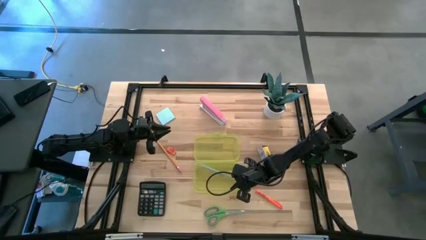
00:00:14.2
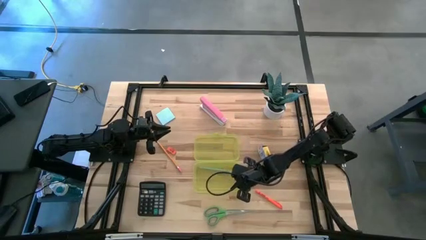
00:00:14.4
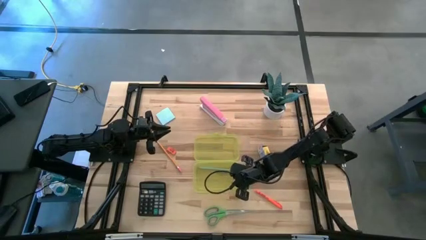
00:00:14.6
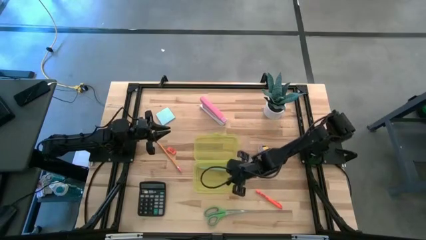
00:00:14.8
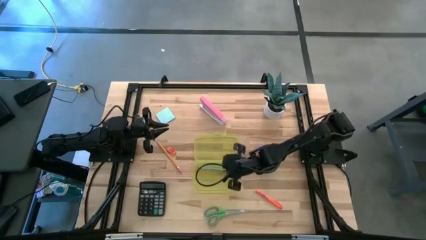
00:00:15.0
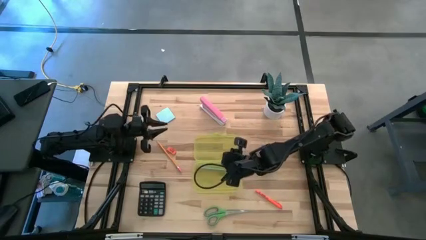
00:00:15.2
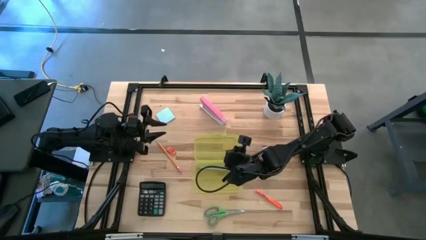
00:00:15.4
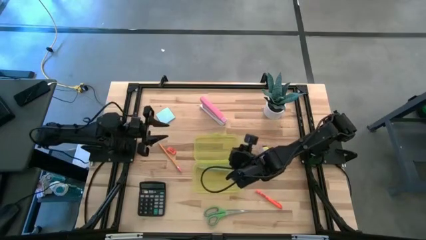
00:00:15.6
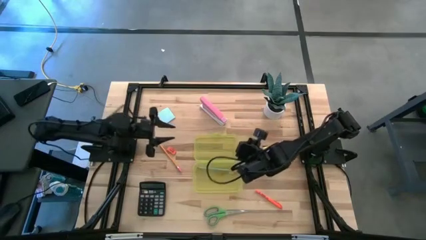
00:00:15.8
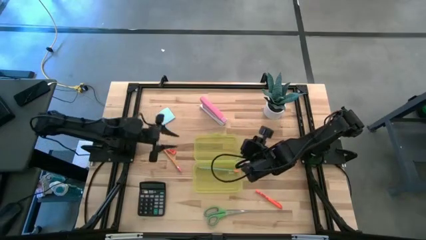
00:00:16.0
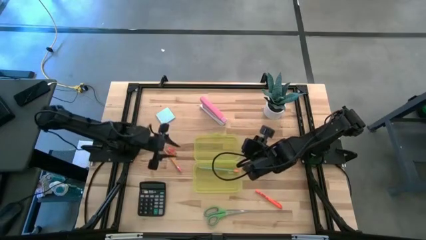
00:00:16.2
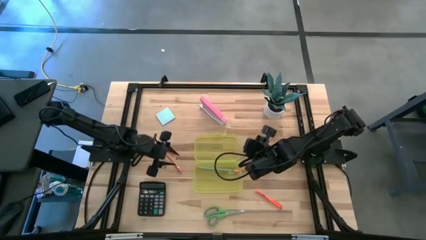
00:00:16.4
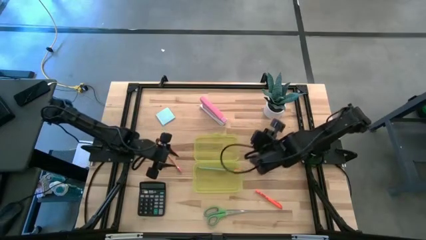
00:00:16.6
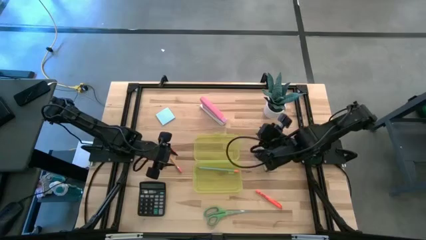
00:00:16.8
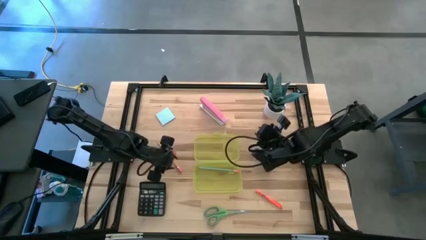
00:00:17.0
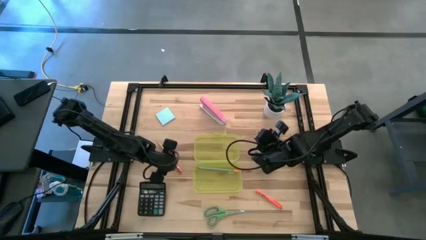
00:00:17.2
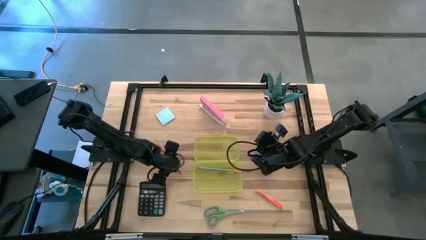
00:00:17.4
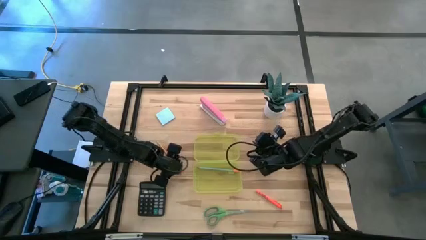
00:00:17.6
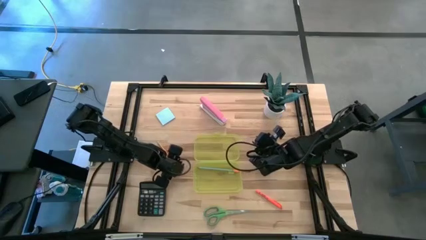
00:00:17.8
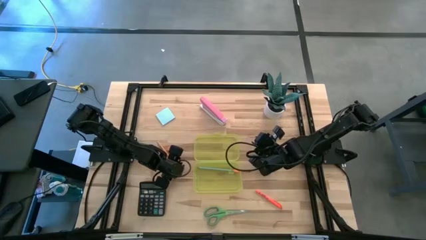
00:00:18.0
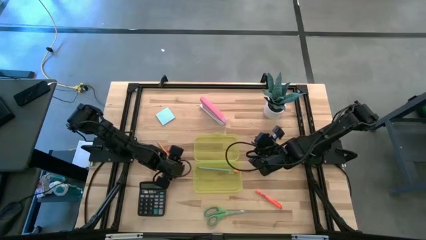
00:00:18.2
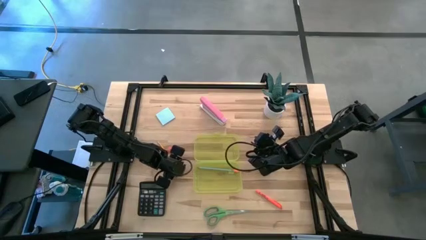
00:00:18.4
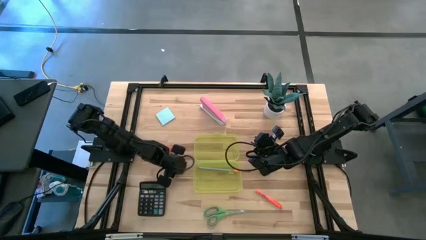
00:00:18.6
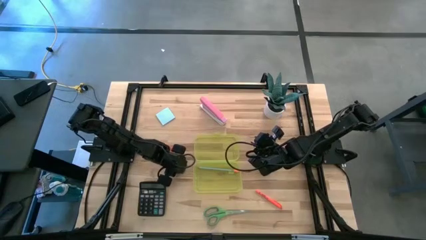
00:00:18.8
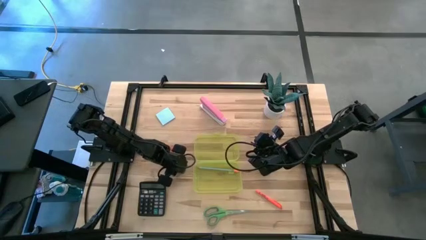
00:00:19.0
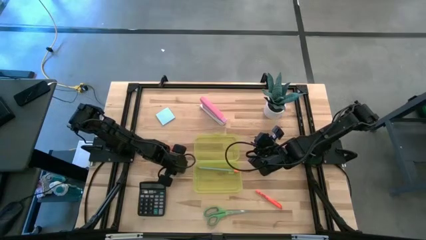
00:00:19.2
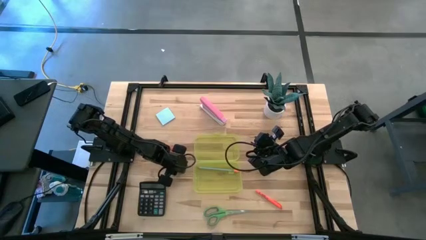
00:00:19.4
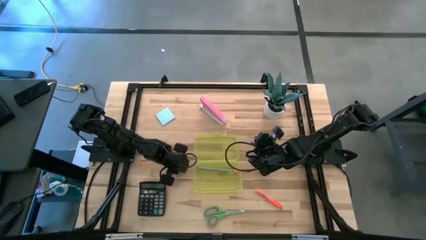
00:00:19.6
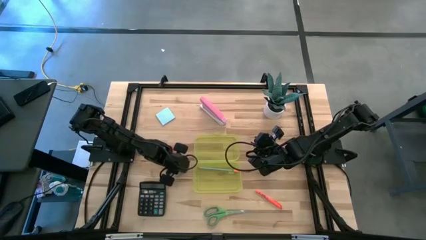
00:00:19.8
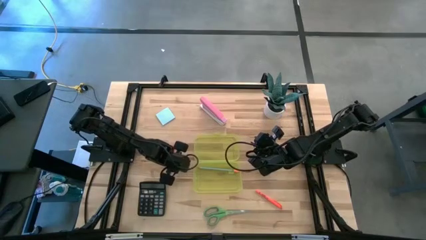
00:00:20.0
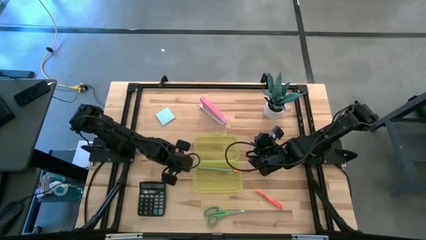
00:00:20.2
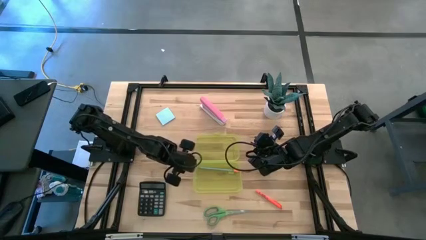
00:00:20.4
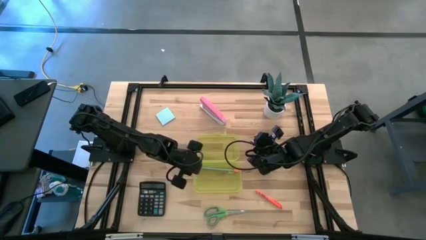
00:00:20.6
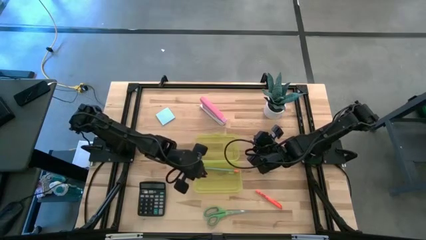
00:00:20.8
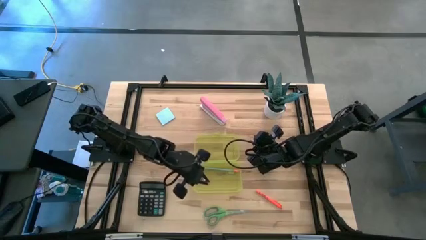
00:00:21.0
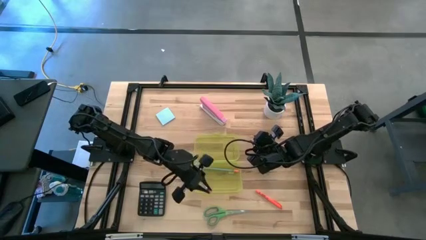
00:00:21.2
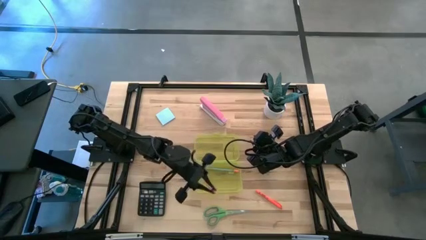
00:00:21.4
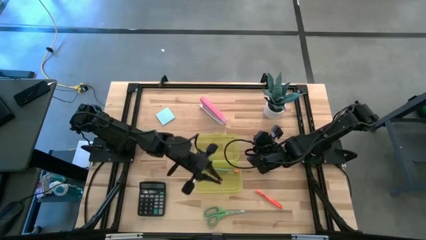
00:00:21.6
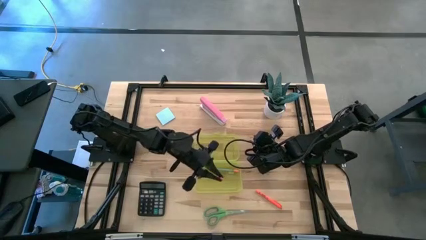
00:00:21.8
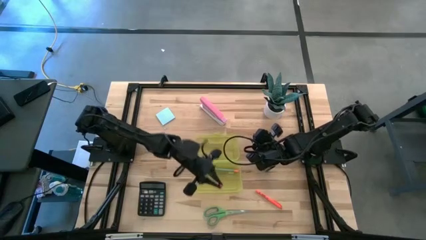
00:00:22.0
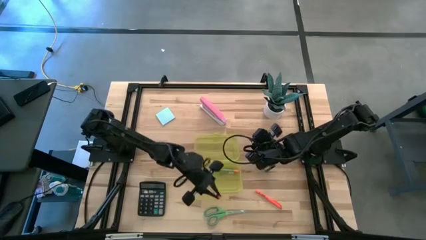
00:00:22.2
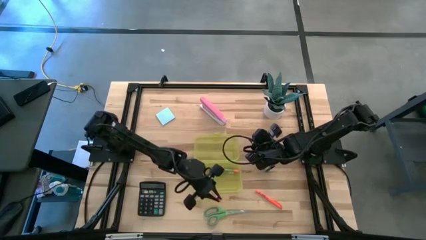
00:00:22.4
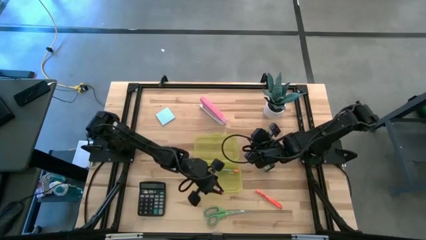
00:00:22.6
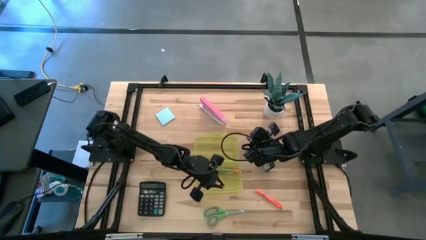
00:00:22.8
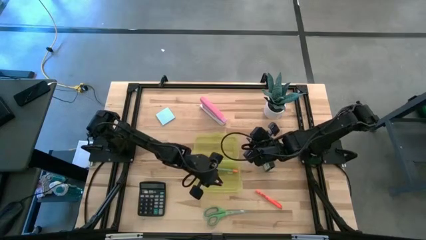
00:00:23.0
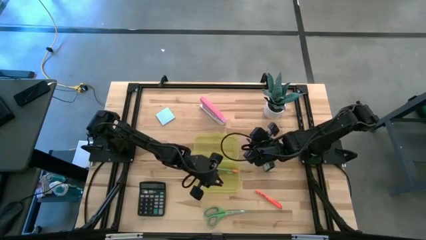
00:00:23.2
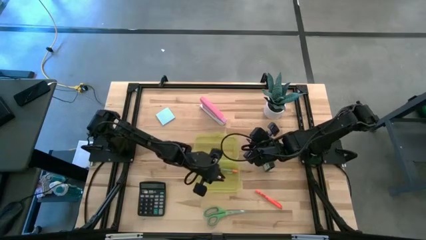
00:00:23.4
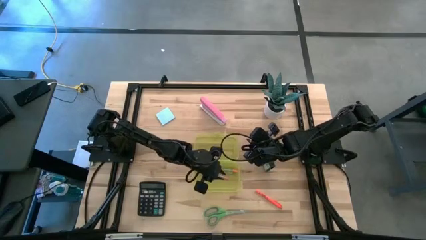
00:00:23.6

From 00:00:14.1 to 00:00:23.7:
Task: Pack school essentials
Put the orange pencil into the yellow supply box

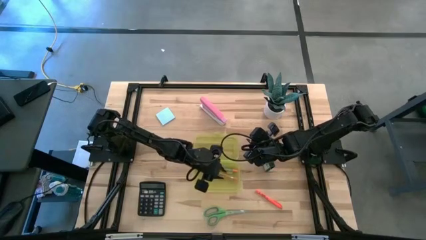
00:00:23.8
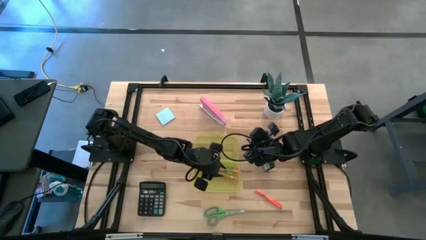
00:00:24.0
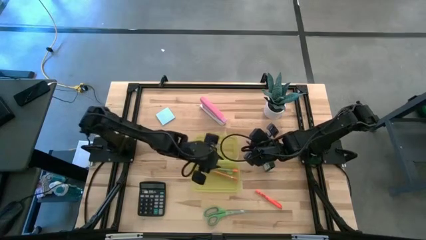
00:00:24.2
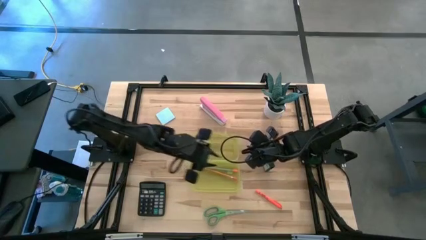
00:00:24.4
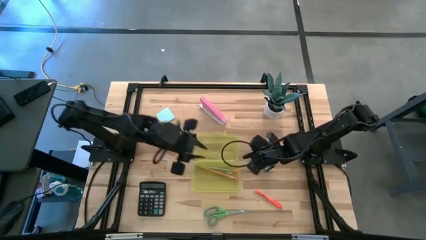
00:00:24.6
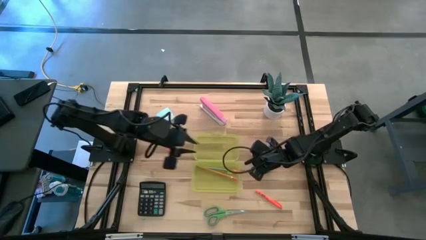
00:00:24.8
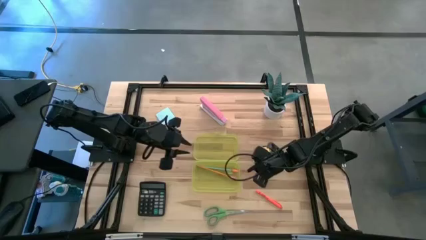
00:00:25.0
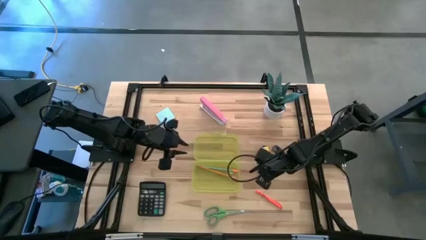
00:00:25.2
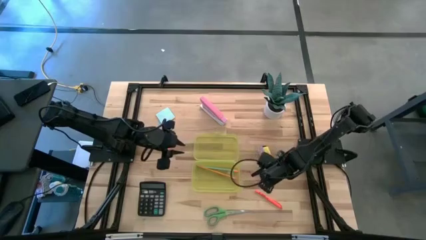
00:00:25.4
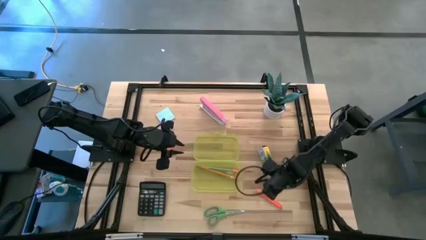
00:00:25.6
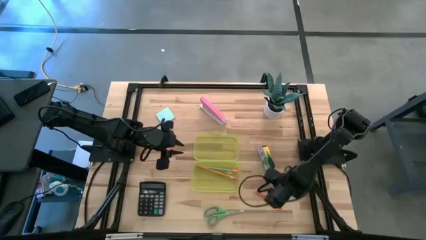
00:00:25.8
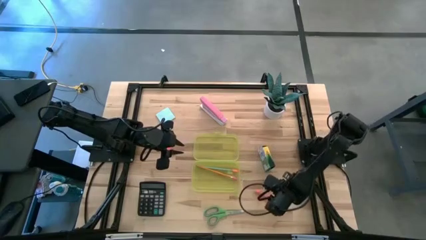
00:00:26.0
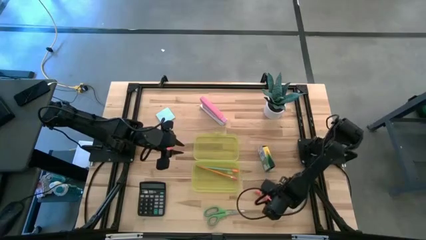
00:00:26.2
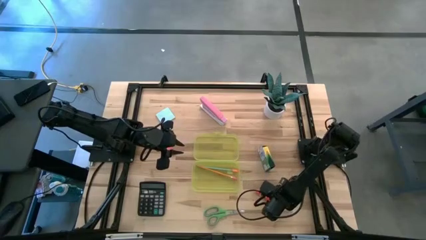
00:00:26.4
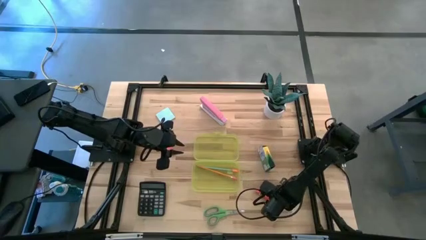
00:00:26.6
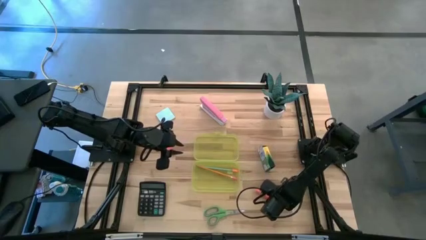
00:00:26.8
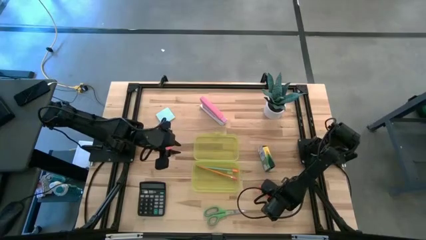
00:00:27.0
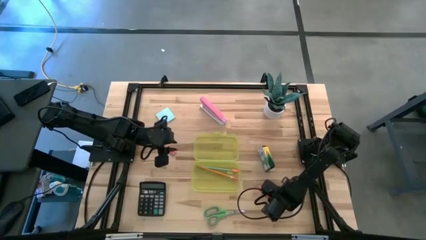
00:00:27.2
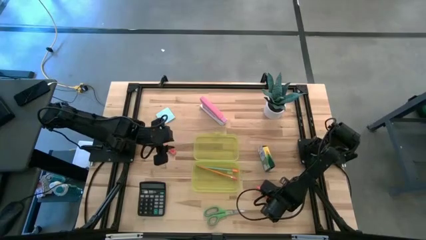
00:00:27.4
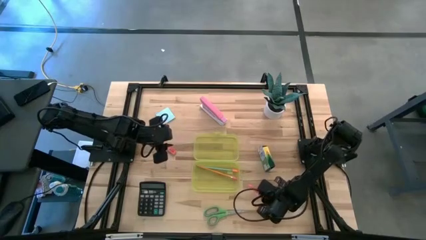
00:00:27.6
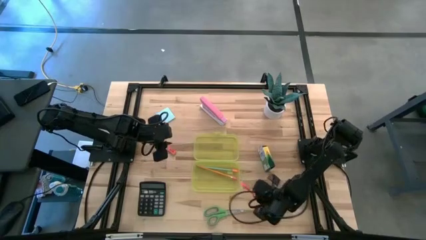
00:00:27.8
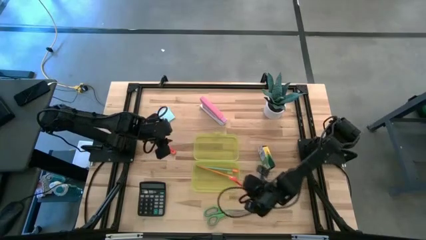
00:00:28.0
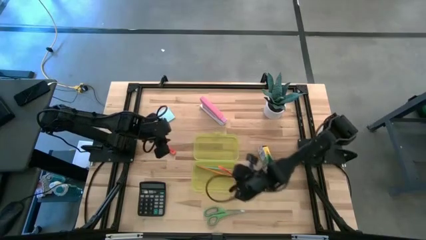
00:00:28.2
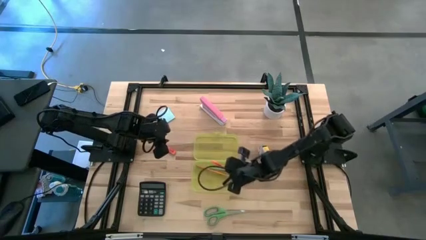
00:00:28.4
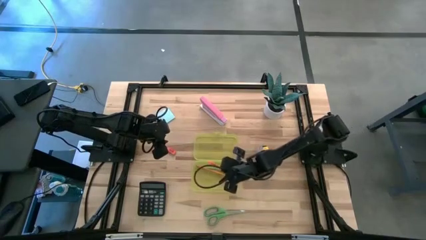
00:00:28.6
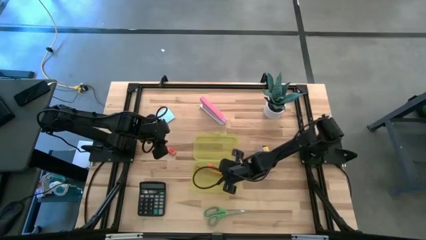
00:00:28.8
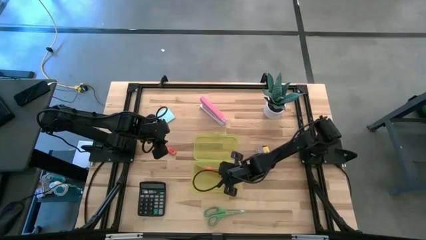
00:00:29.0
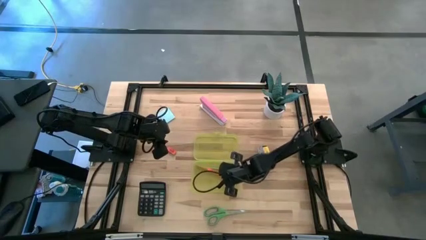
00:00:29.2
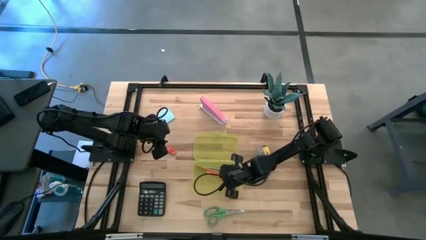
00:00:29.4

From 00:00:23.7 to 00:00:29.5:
Put the orange pen into the yellow supply box
